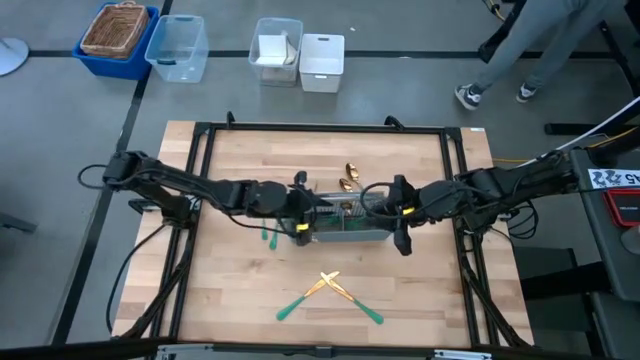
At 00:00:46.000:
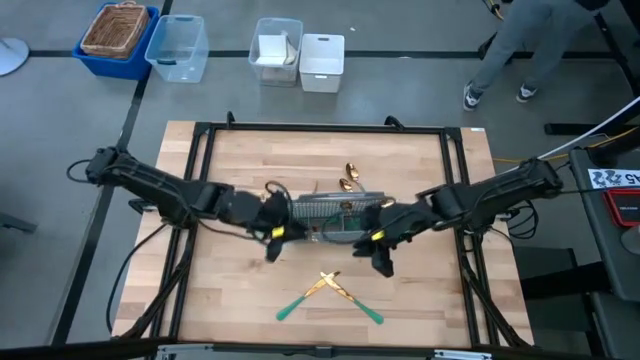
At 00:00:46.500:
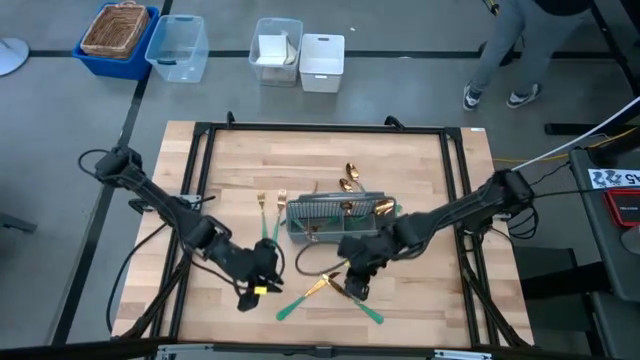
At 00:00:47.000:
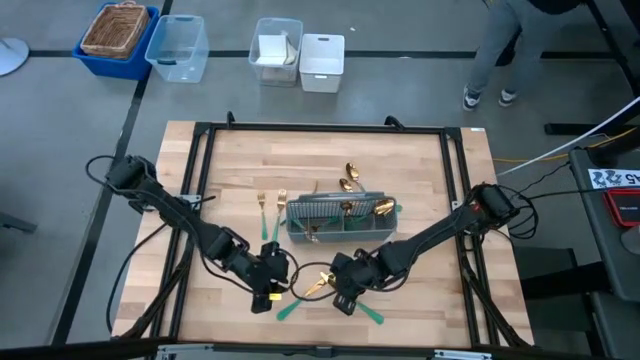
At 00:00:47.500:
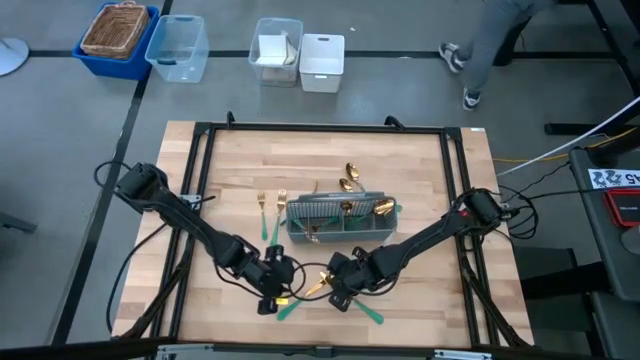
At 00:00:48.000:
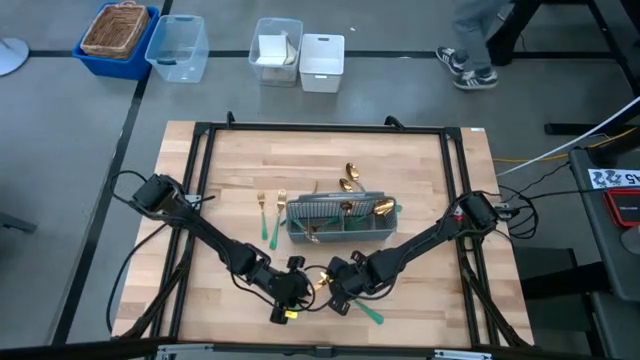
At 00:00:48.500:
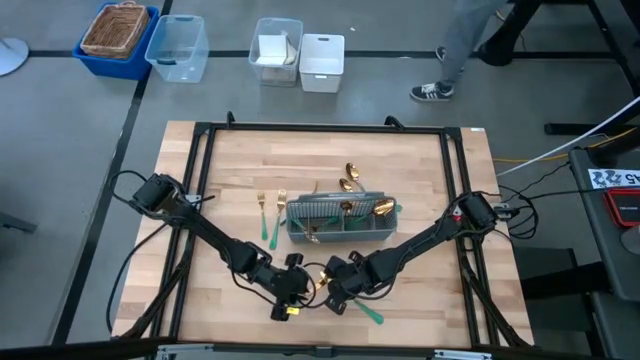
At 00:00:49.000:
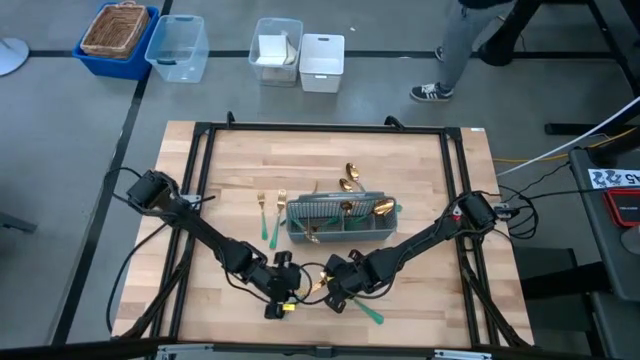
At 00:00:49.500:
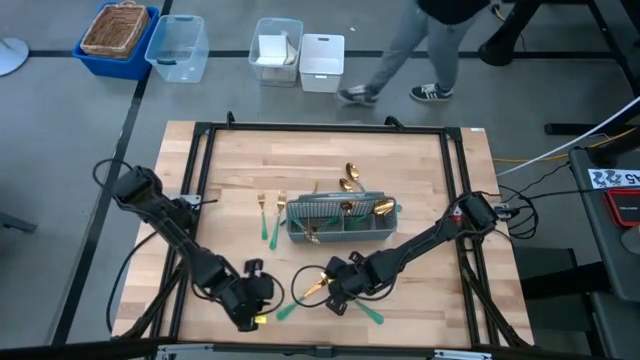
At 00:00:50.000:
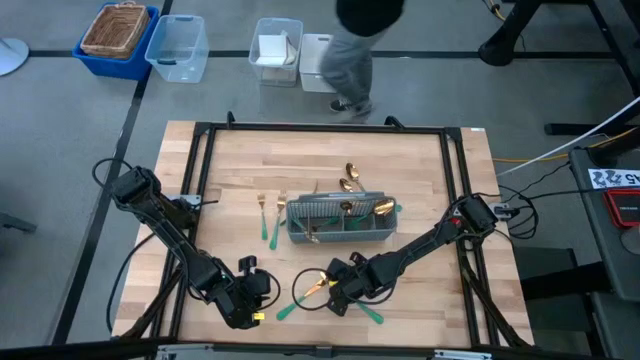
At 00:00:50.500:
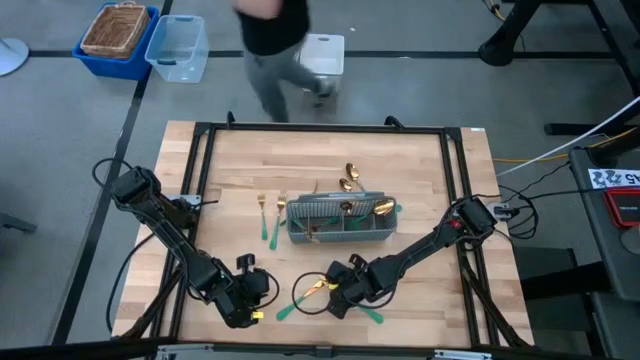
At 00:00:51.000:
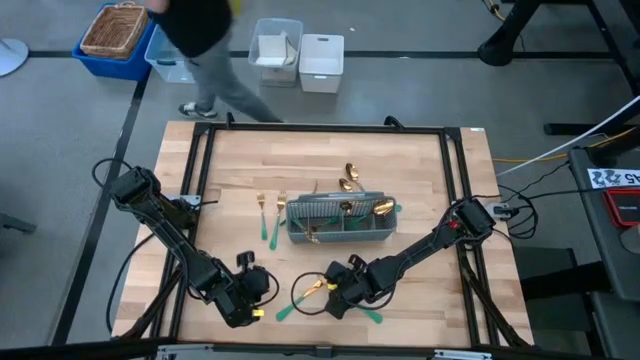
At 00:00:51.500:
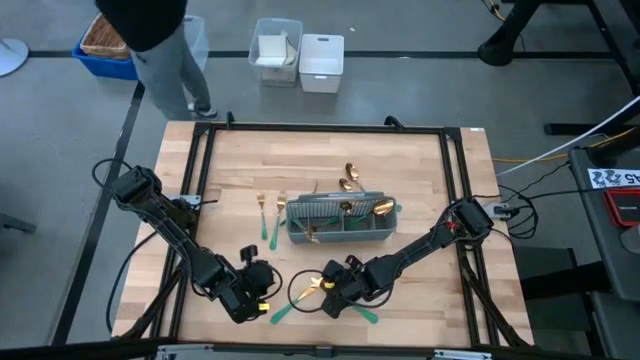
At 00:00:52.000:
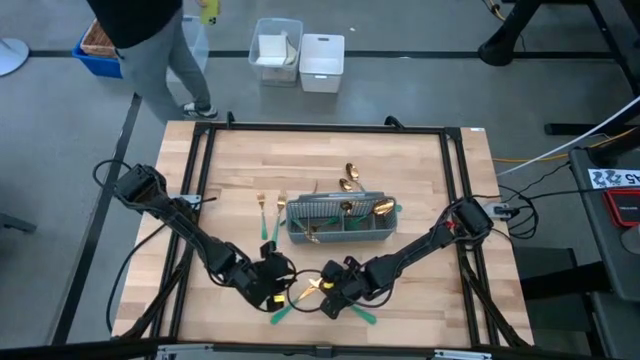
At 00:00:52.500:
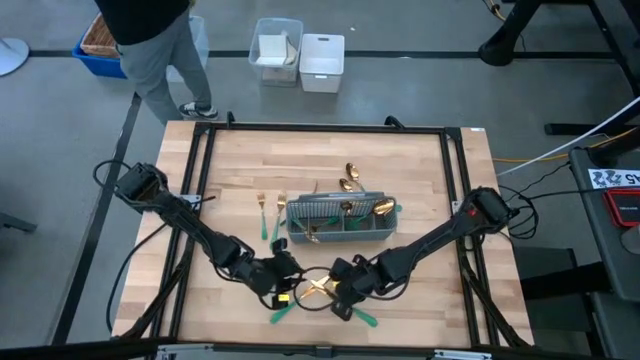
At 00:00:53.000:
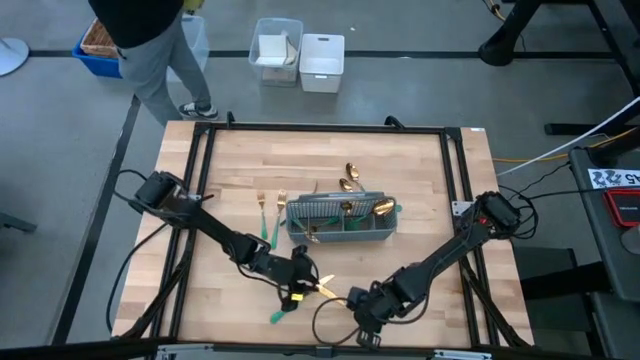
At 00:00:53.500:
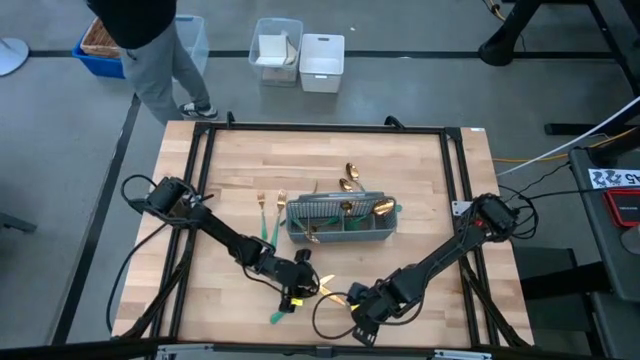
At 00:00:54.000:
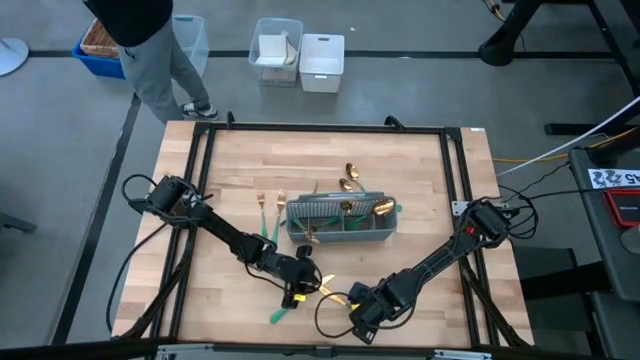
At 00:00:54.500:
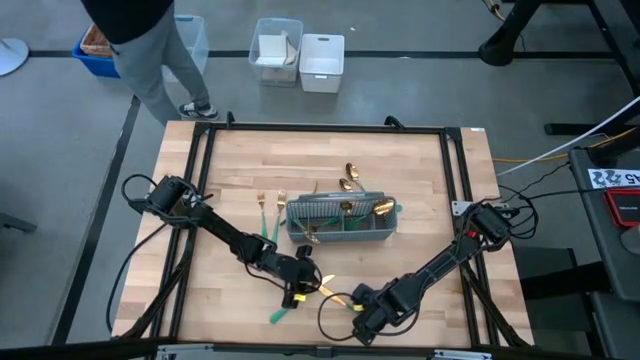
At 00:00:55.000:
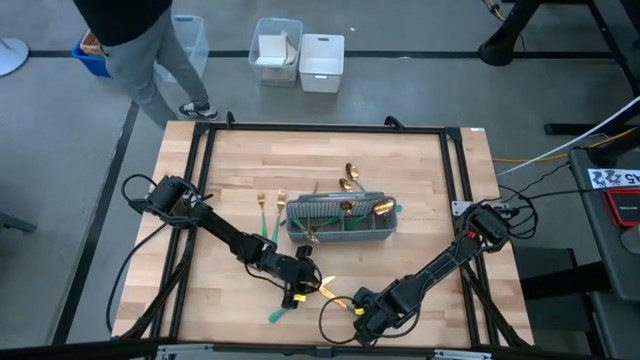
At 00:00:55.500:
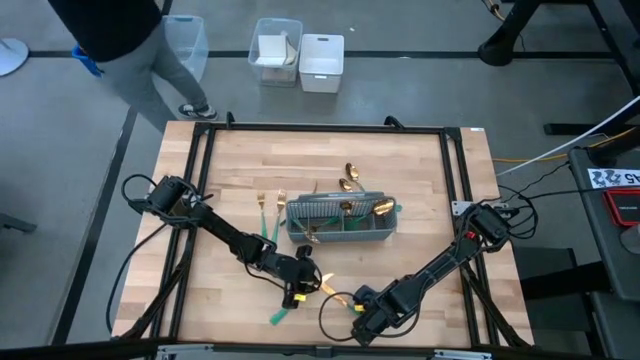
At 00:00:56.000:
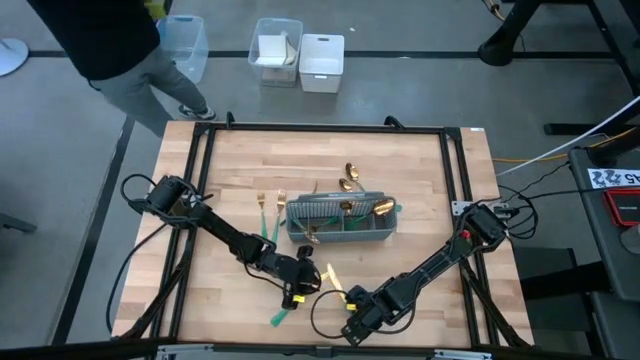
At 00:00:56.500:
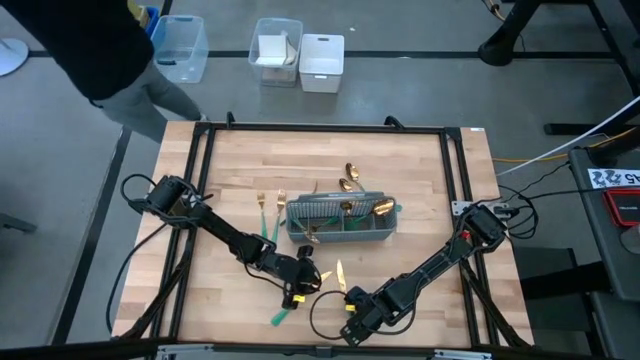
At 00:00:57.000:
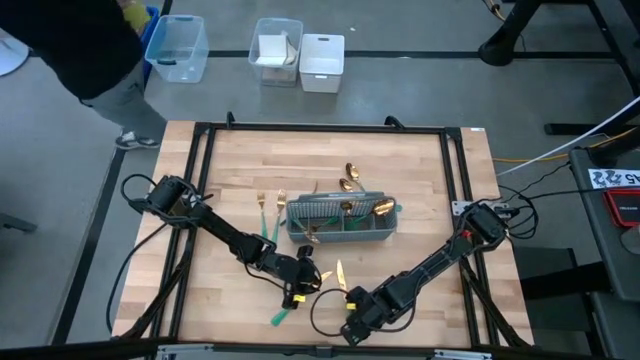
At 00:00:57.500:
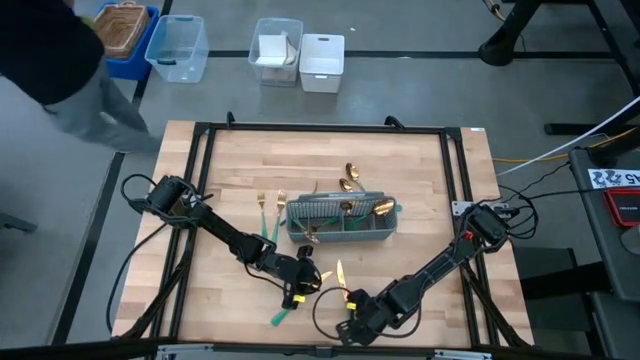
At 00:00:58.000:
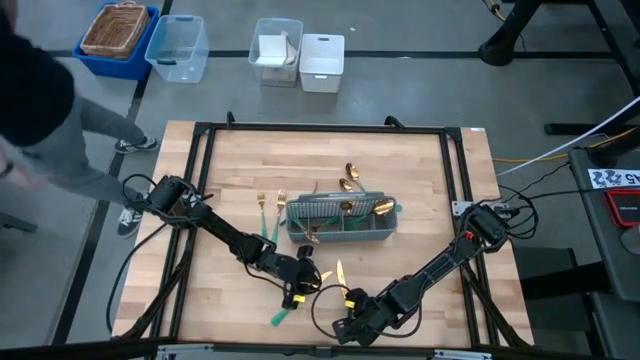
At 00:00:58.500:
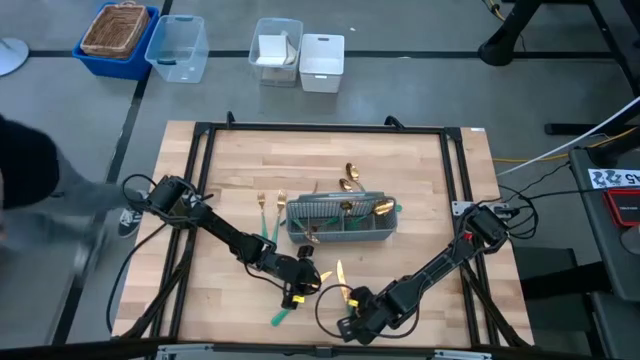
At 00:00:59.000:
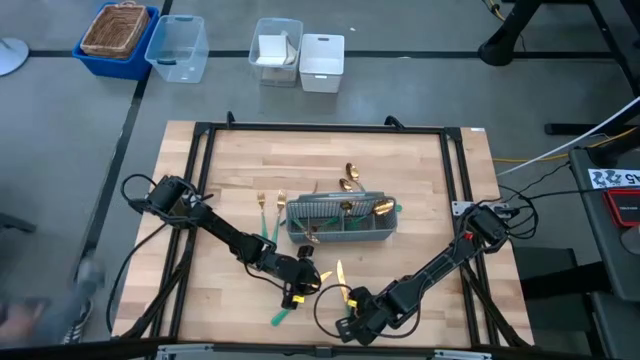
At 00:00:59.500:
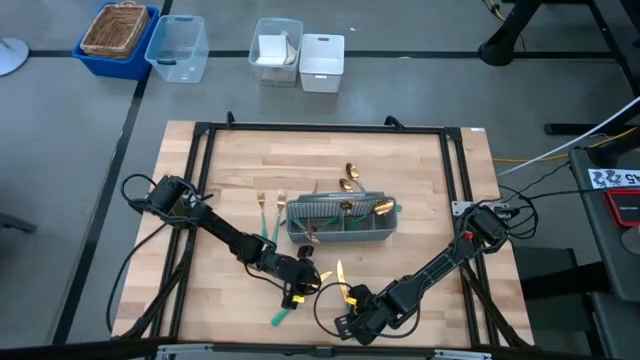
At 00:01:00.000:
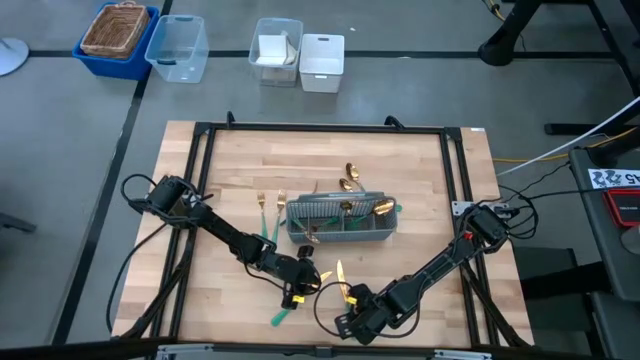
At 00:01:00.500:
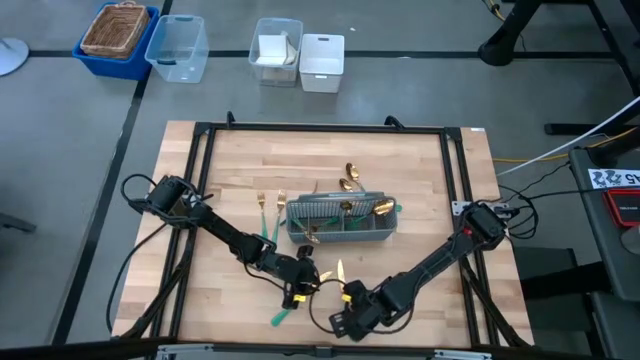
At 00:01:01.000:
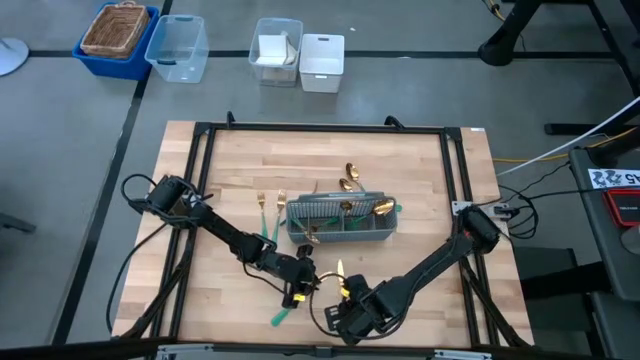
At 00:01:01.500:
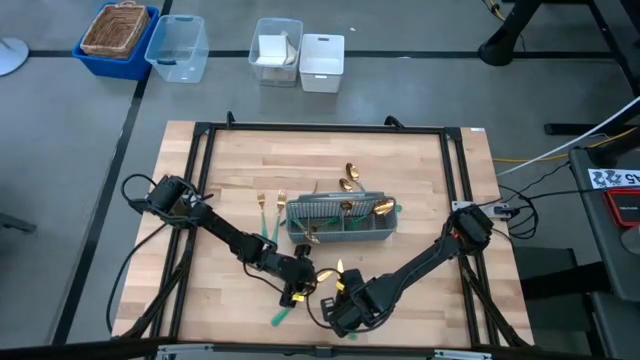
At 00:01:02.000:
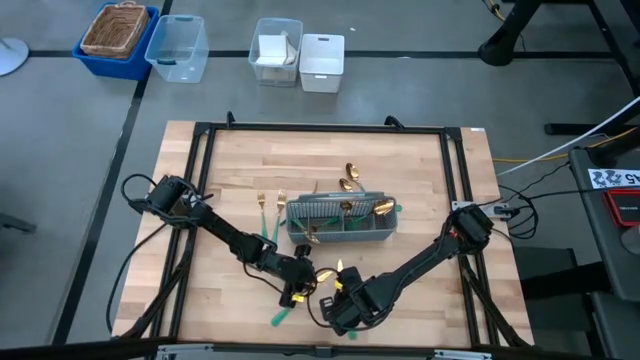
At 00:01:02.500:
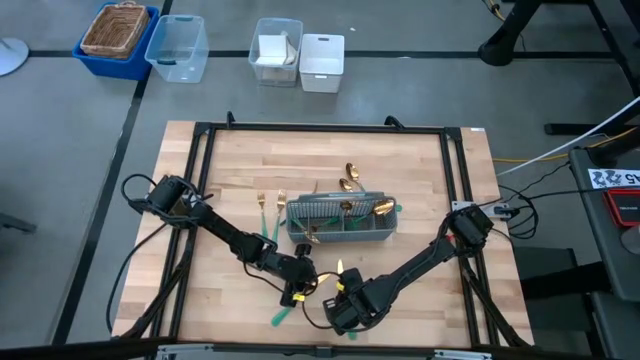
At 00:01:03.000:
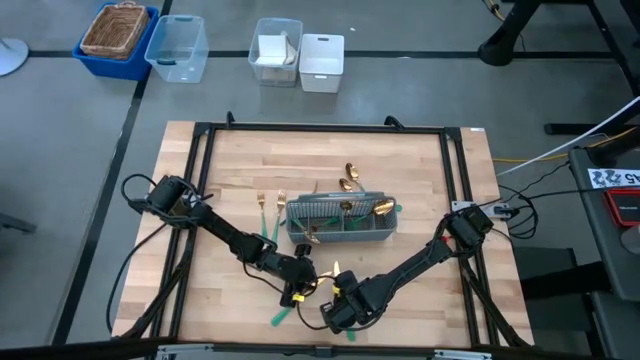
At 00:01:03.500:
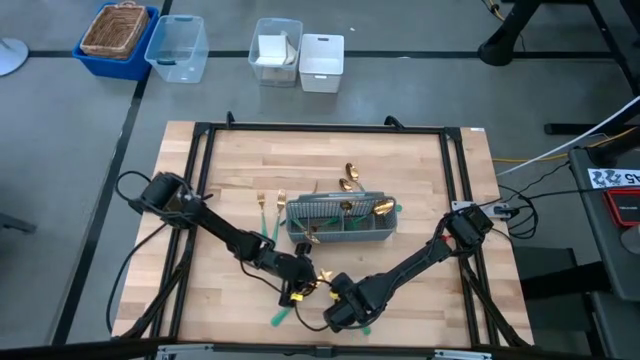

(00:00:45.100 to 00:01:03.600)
Task: Sort silverware
Put the green knife into the gray utensil holder

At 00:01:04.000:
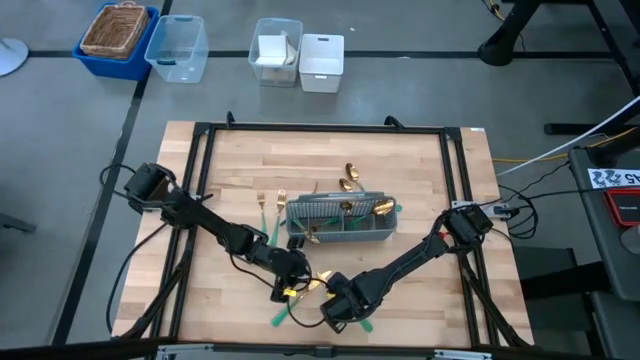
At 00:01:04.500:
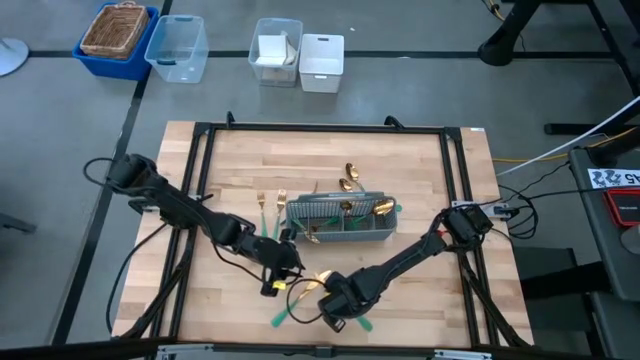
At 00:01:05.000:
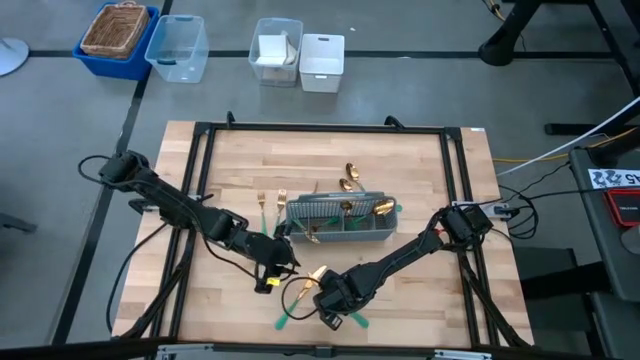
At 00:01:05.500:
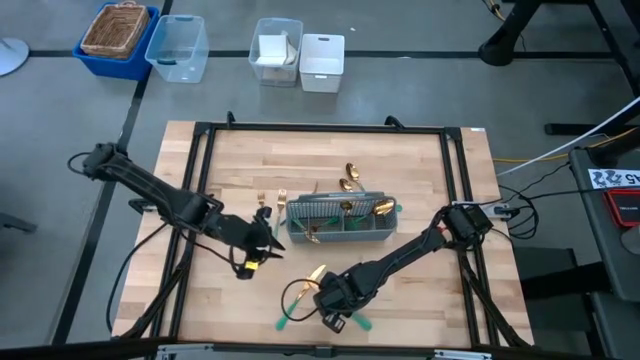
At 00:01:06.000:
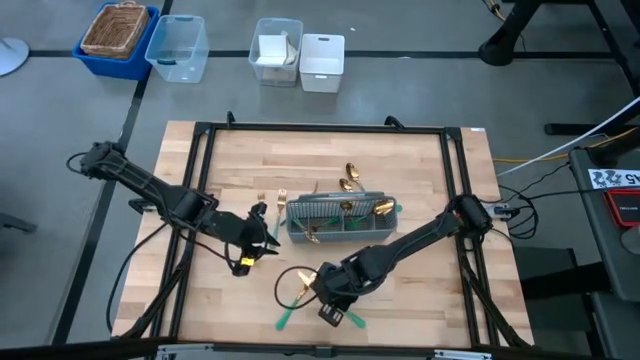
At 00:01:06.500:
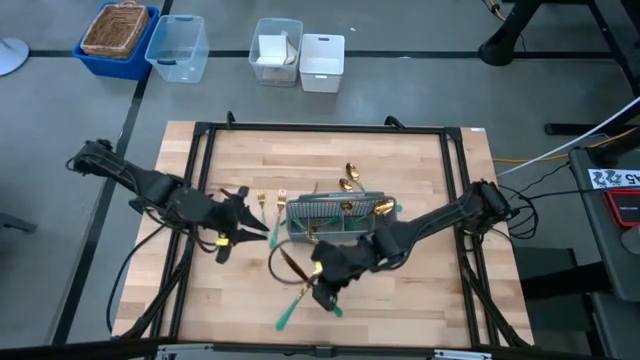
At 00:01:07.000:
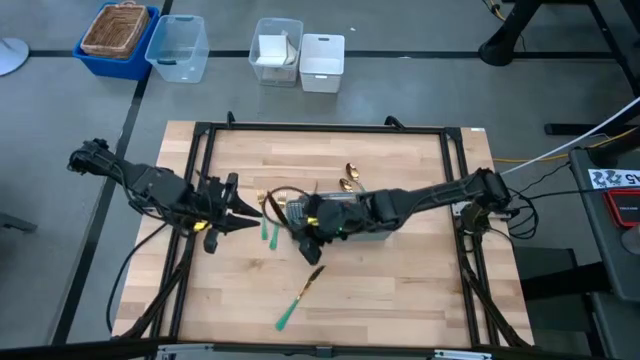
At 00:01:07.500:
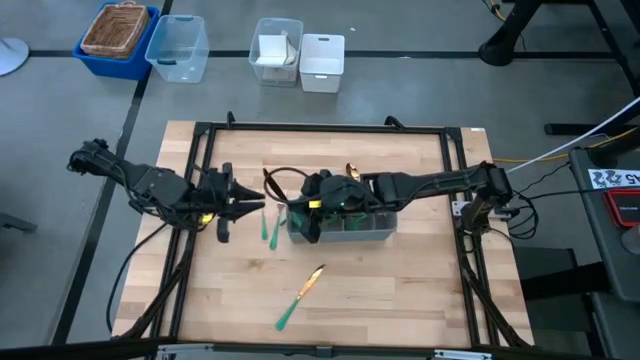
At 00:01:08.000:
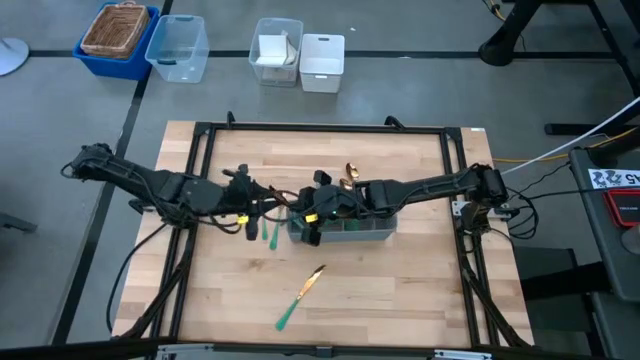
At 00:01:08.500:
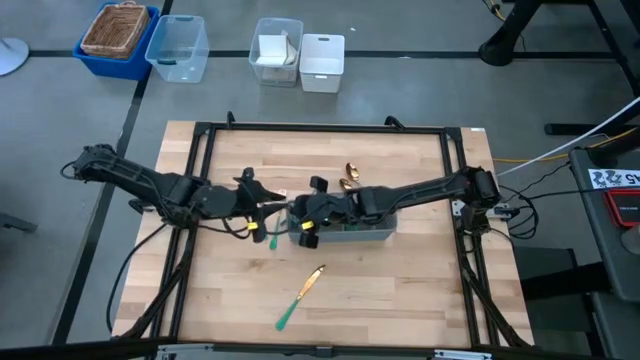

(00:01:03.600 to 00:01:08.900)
Put the green knife into the gray utensil holder
